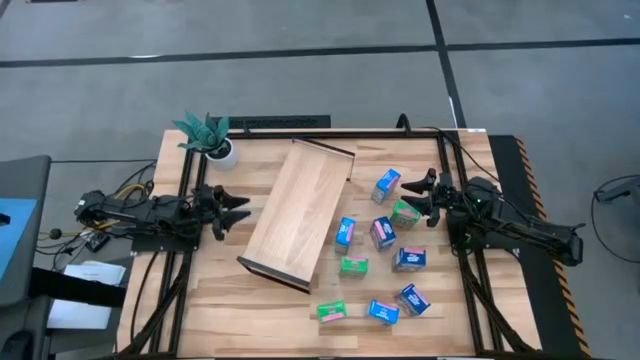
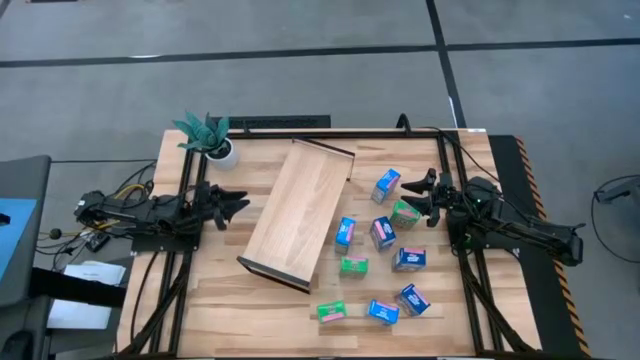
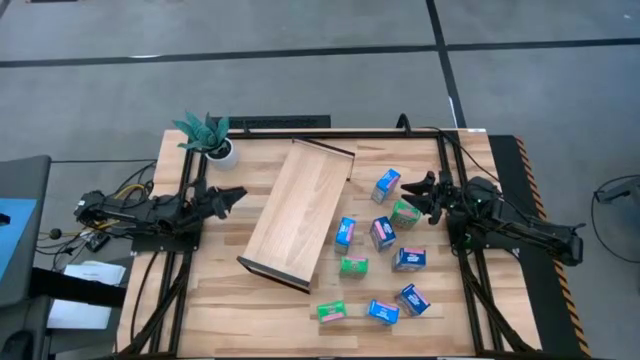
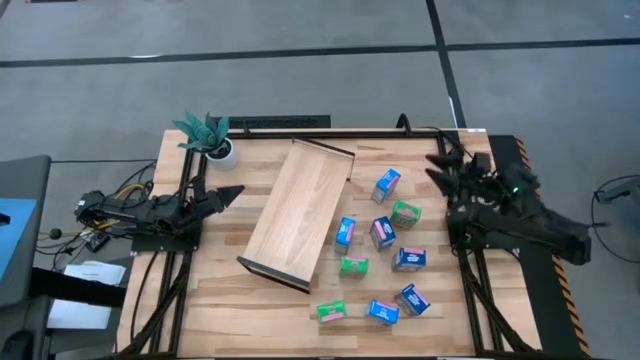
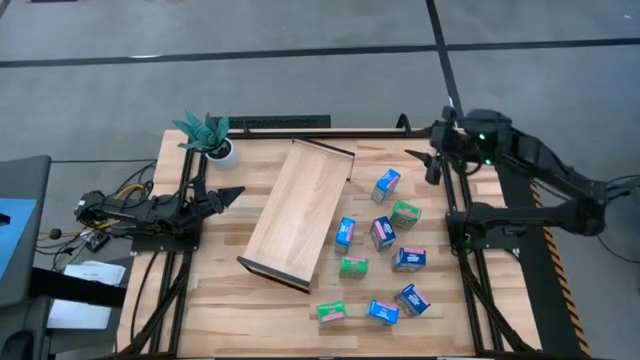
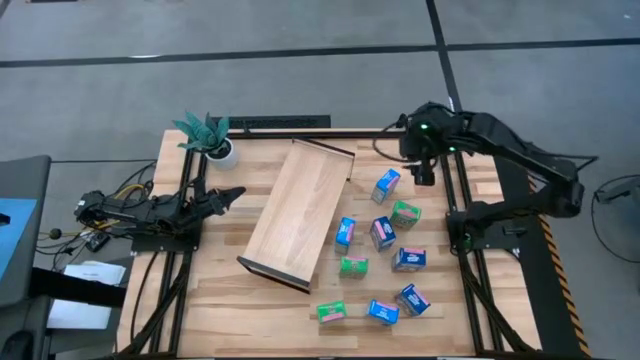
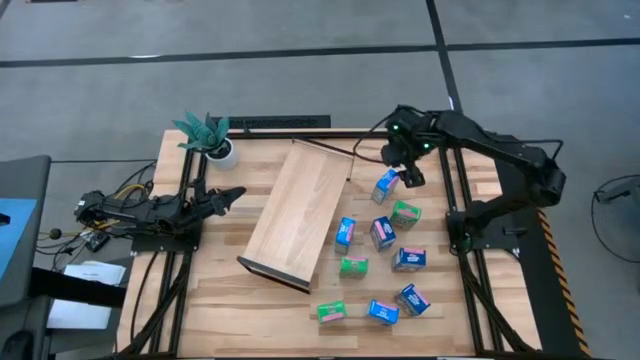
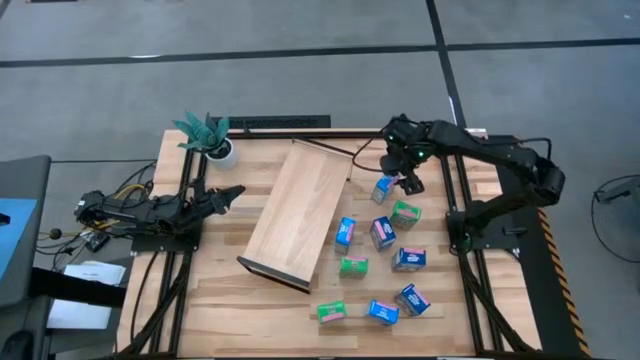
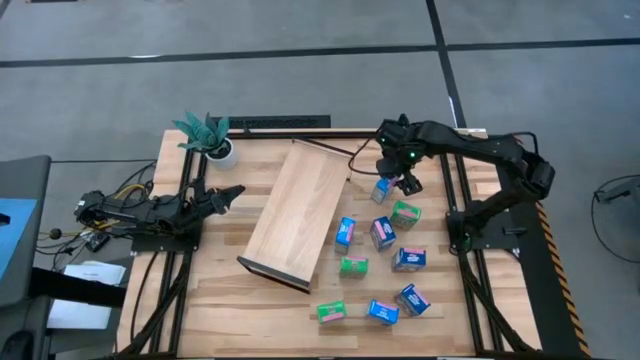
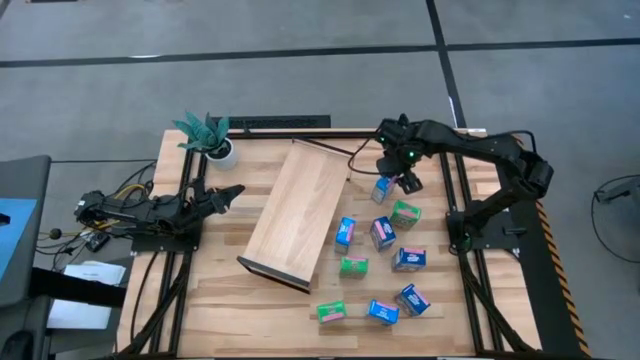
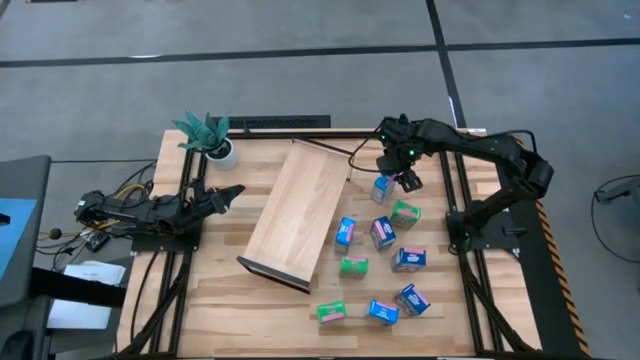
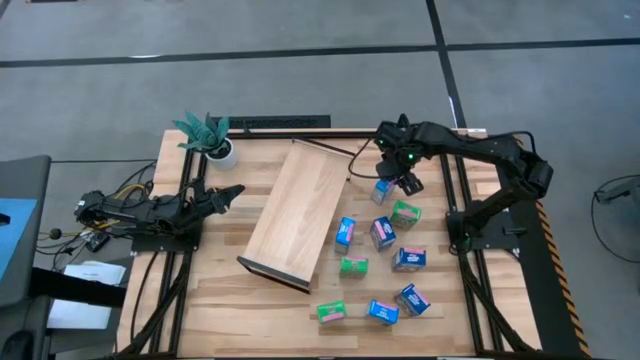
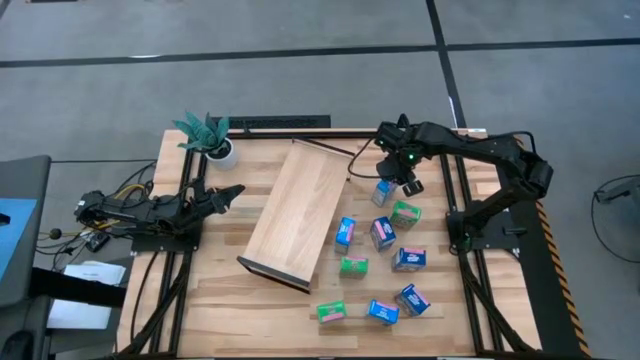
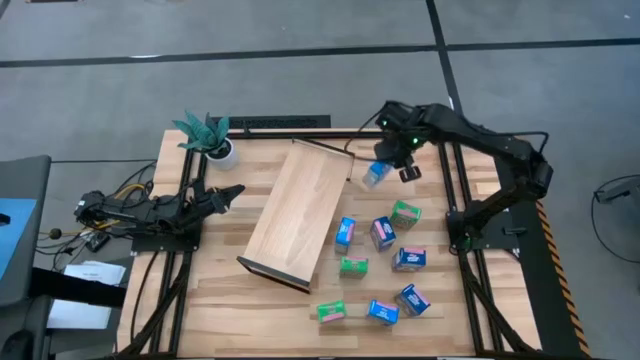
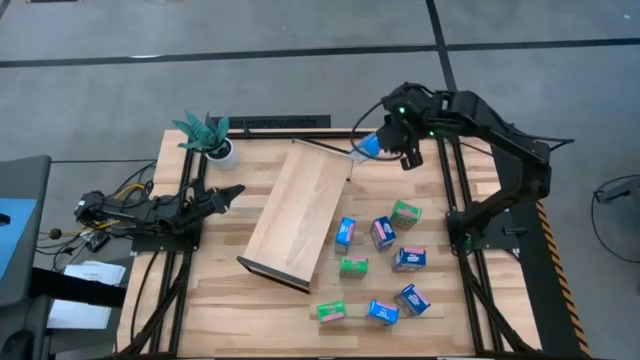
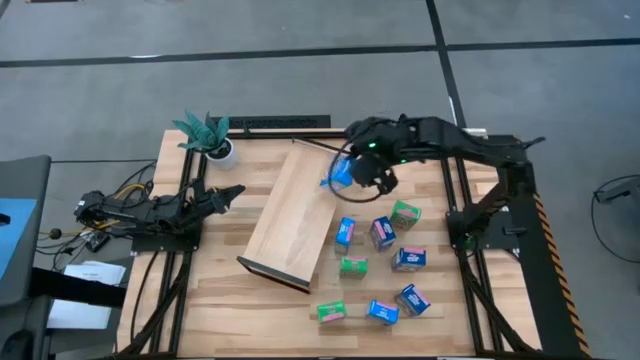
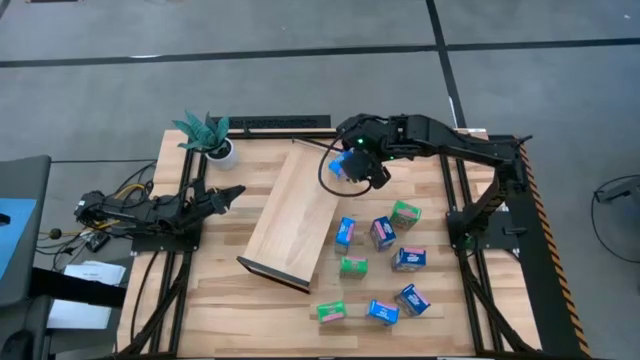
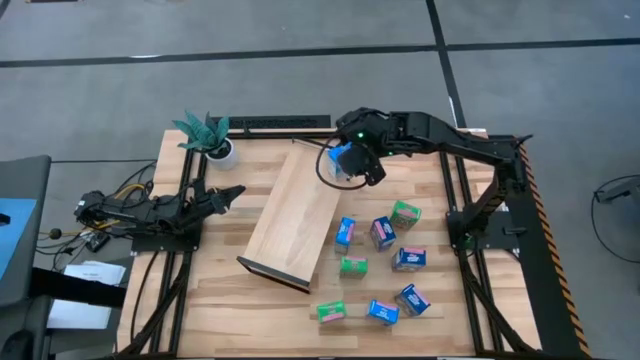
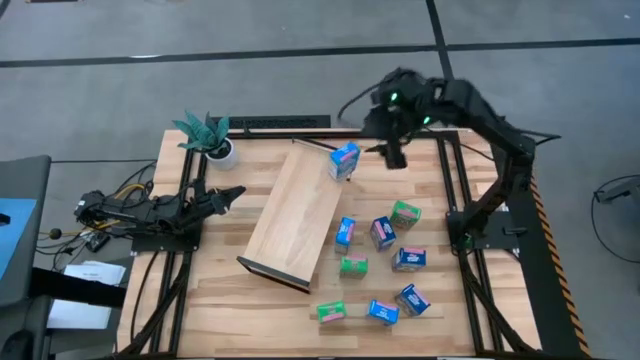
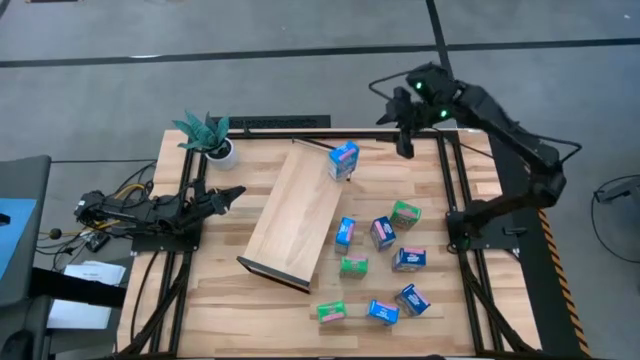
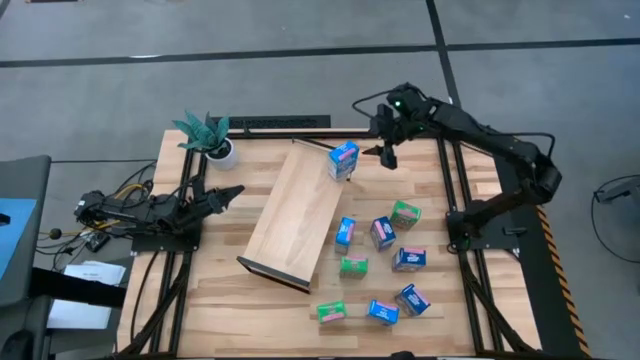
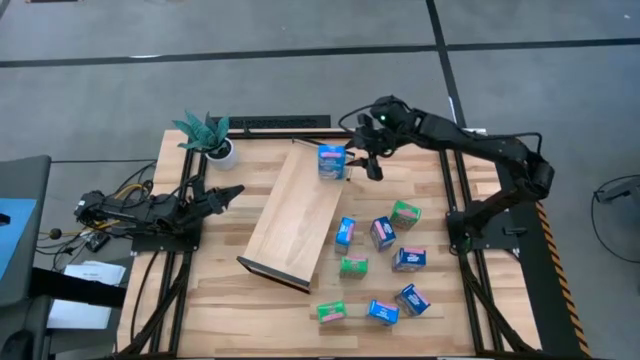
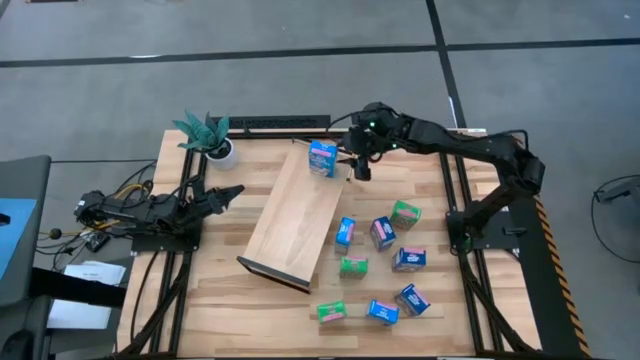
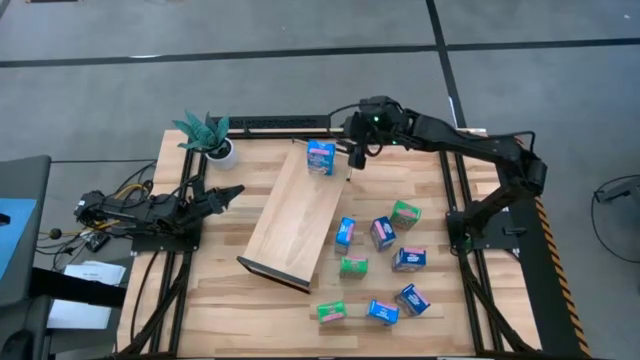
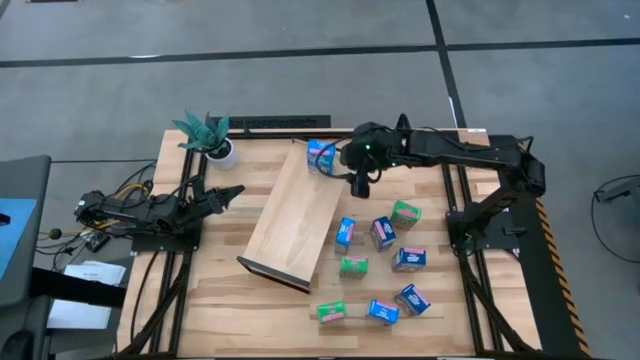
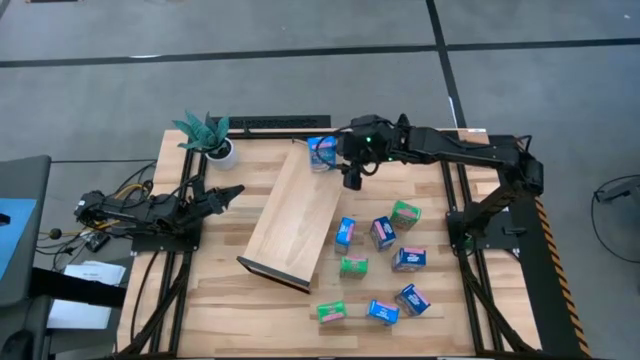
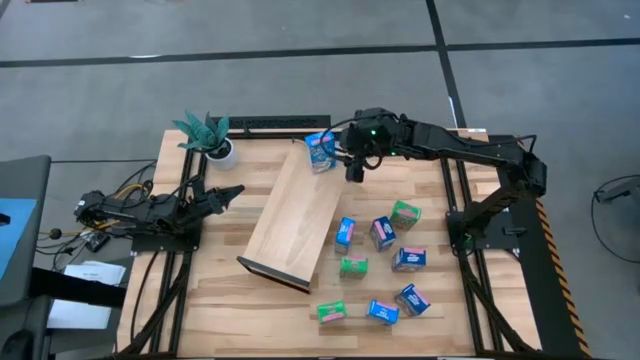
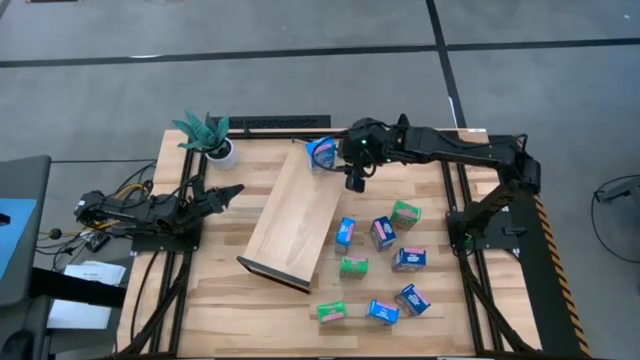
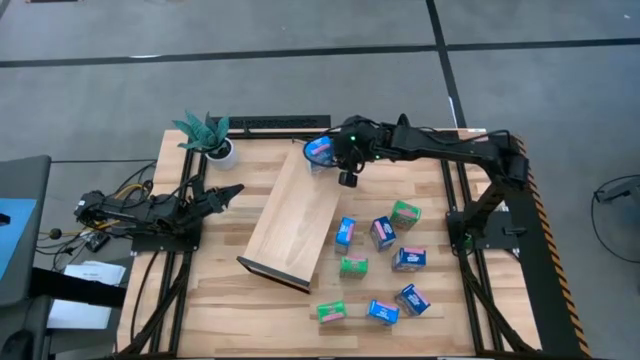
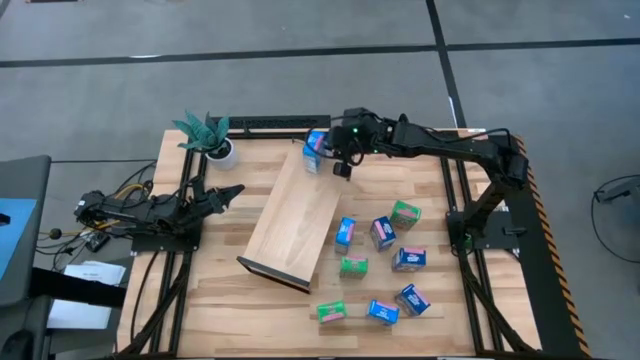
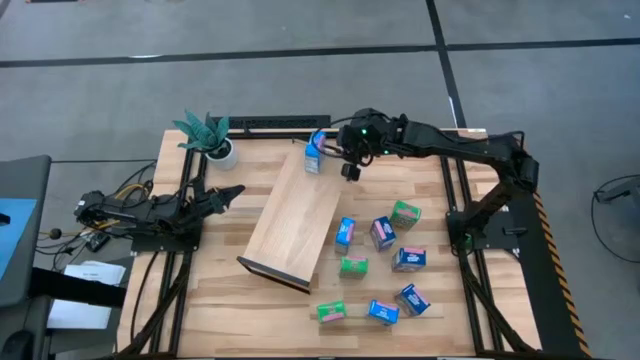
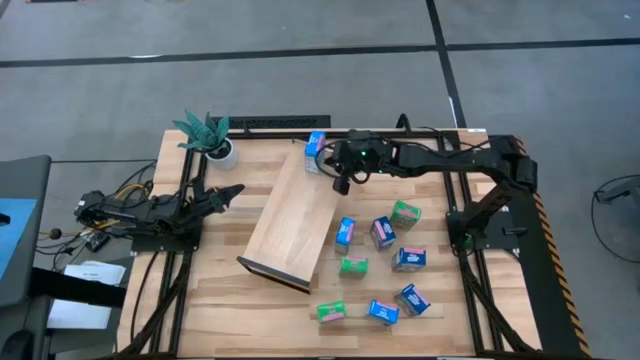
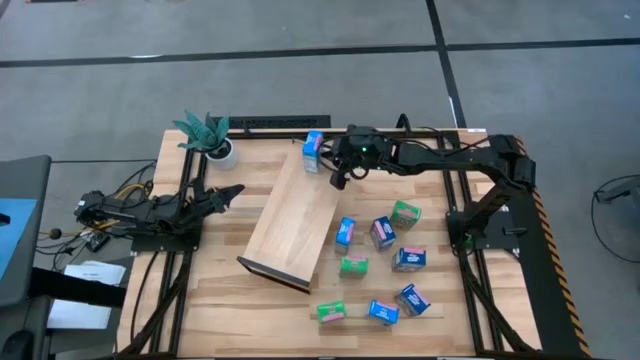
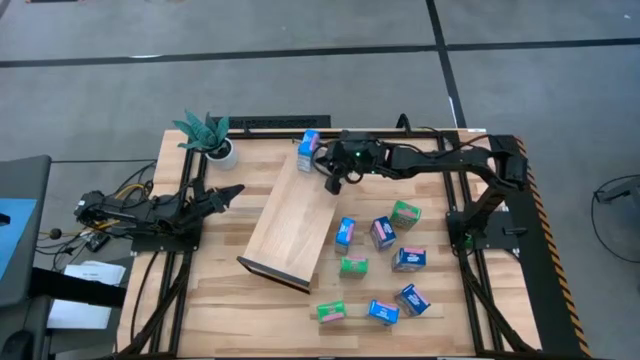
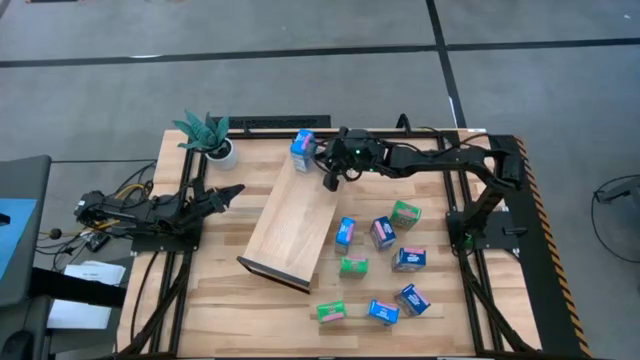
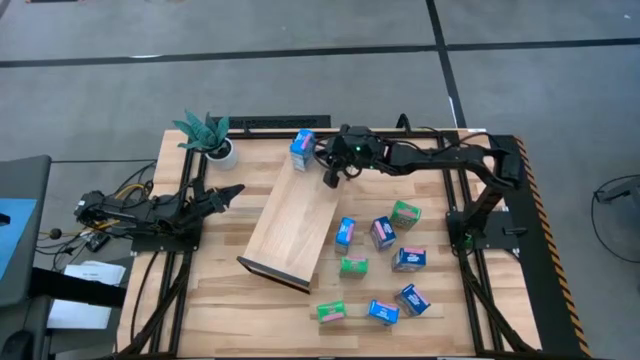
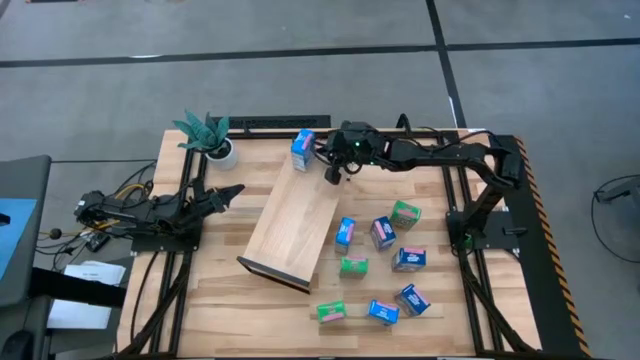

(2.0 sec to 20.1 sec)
Task: Stack cereal on shelf
Put the top light blue cereal box on the shelf
